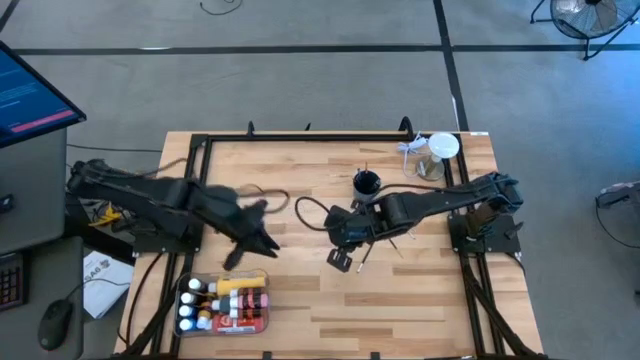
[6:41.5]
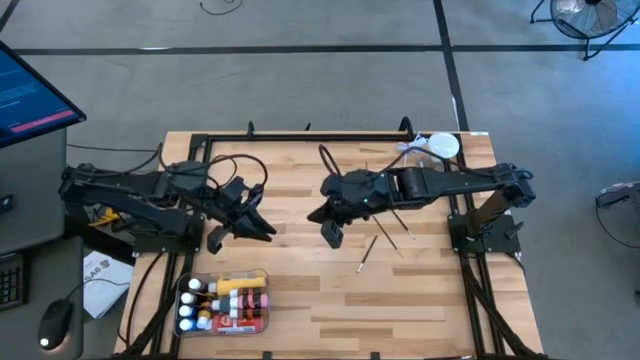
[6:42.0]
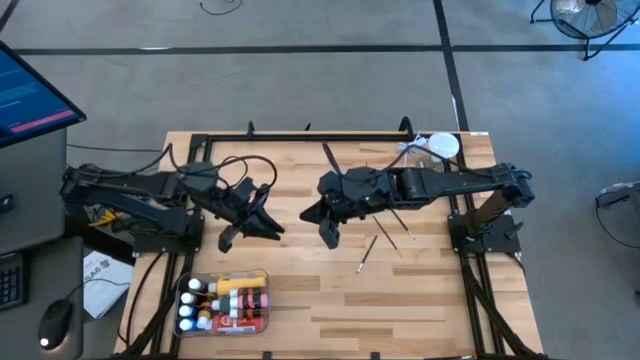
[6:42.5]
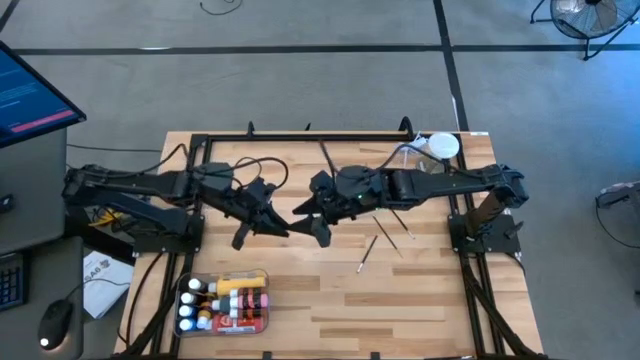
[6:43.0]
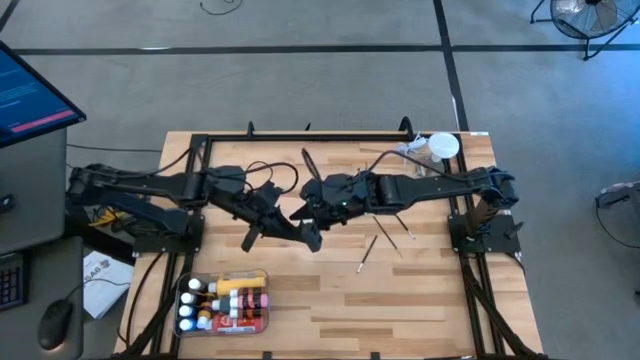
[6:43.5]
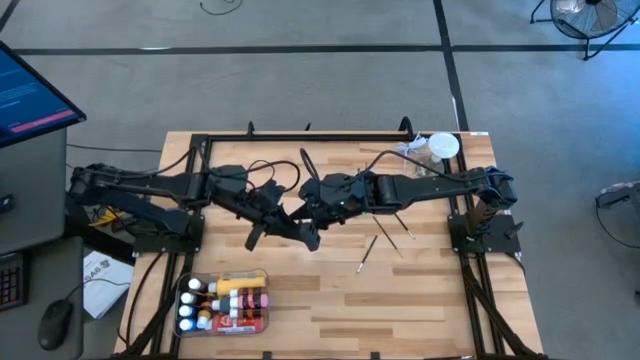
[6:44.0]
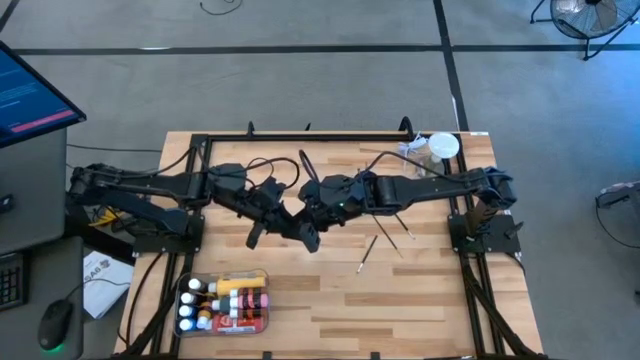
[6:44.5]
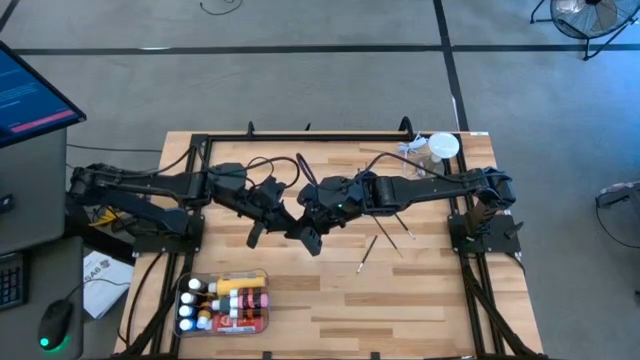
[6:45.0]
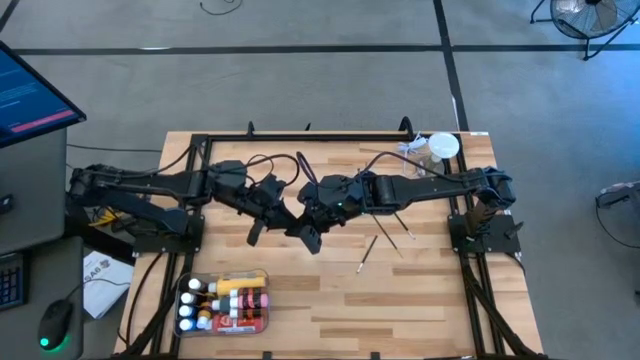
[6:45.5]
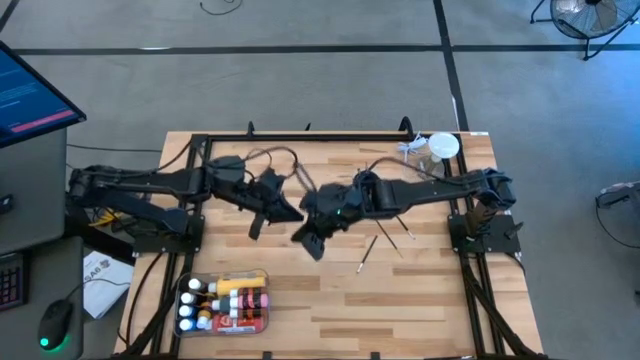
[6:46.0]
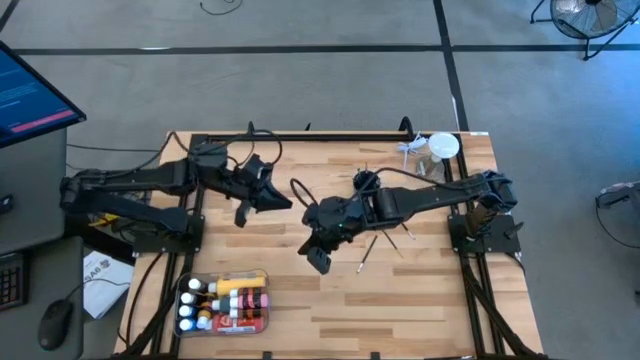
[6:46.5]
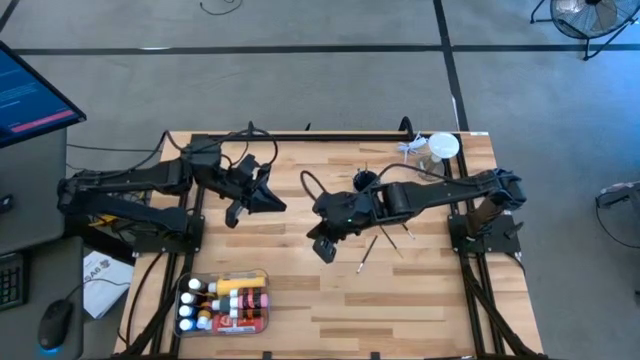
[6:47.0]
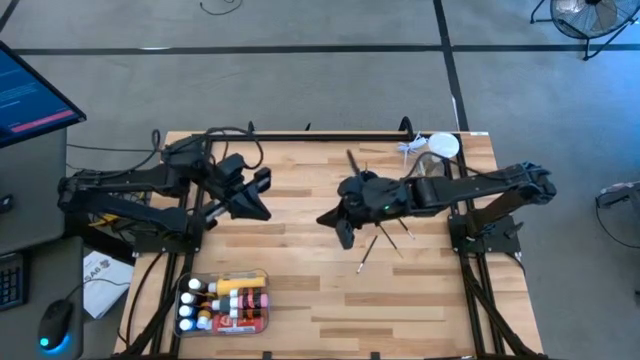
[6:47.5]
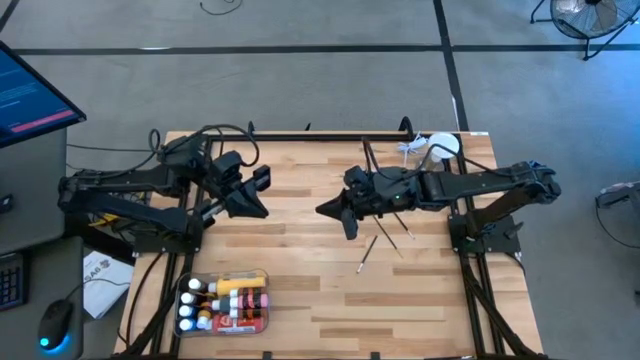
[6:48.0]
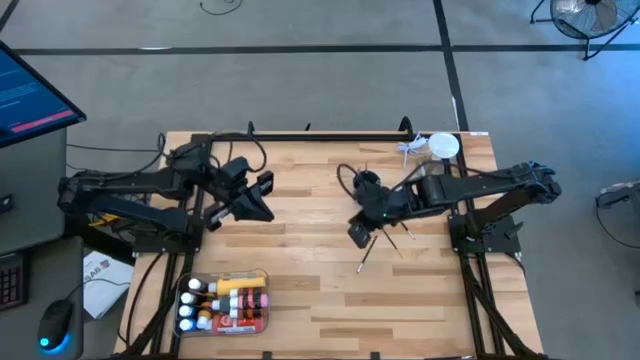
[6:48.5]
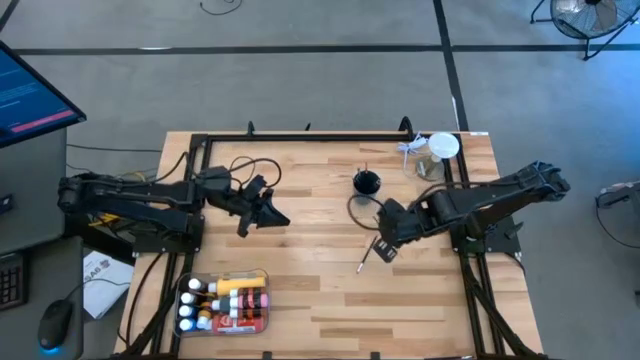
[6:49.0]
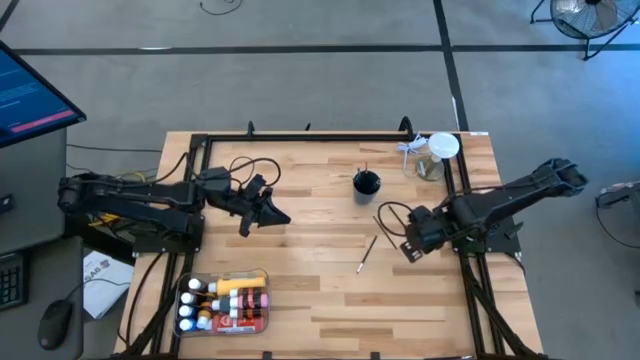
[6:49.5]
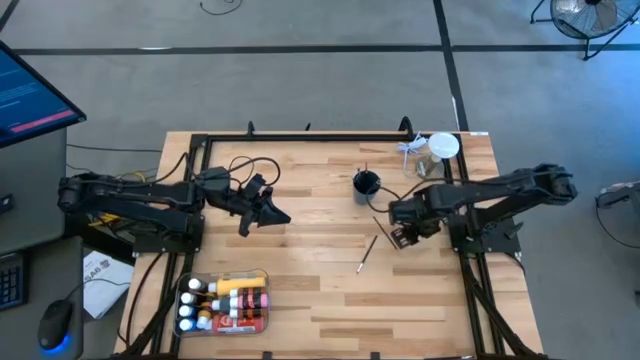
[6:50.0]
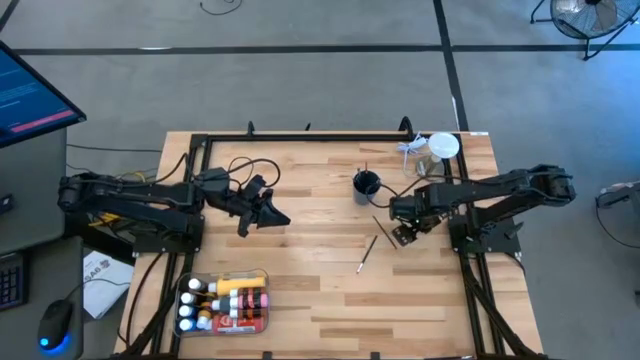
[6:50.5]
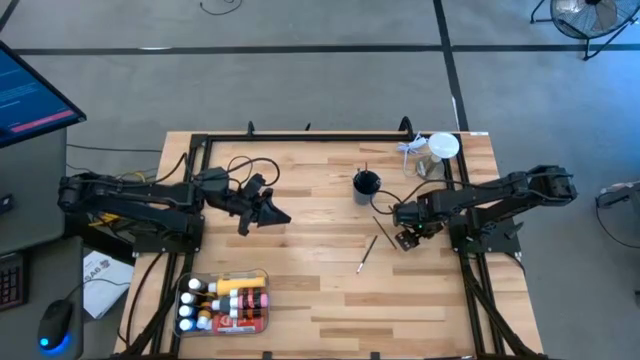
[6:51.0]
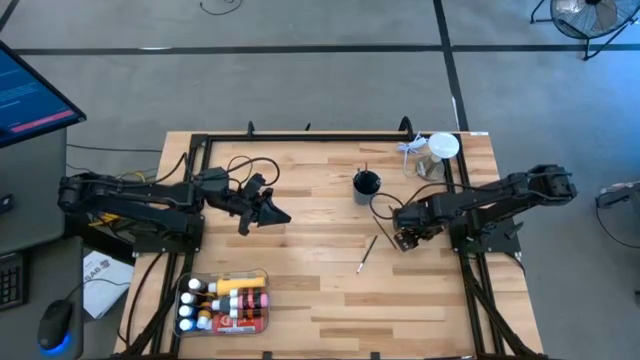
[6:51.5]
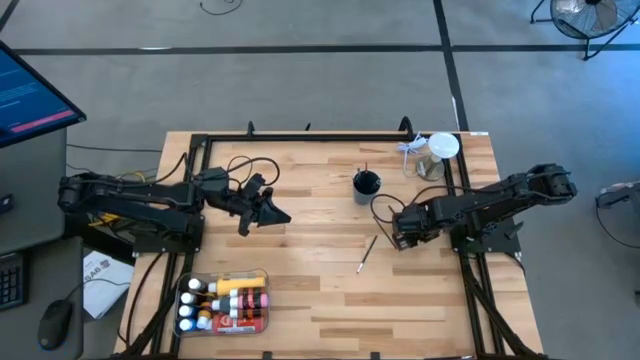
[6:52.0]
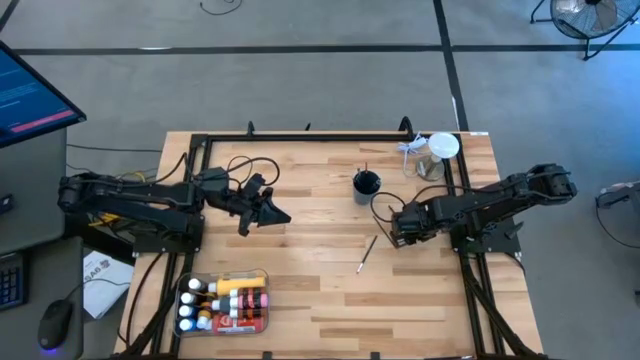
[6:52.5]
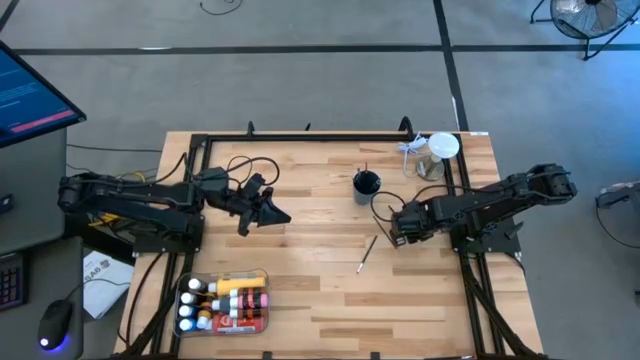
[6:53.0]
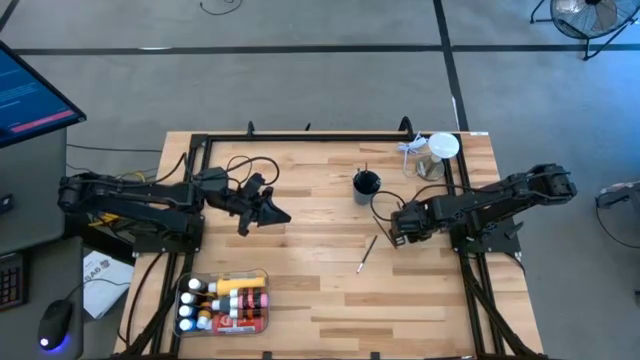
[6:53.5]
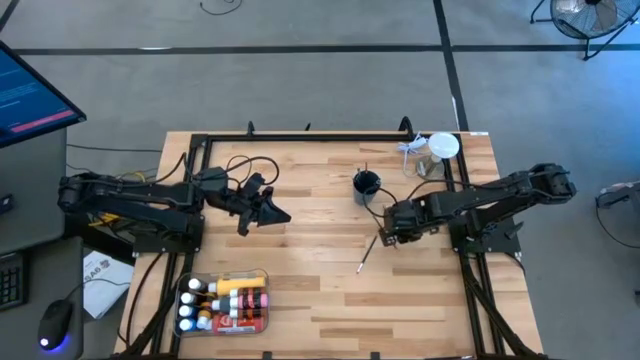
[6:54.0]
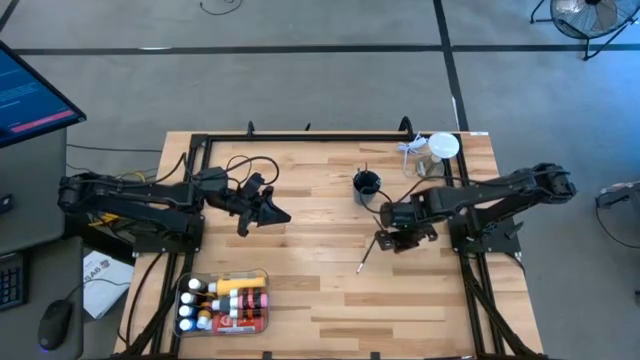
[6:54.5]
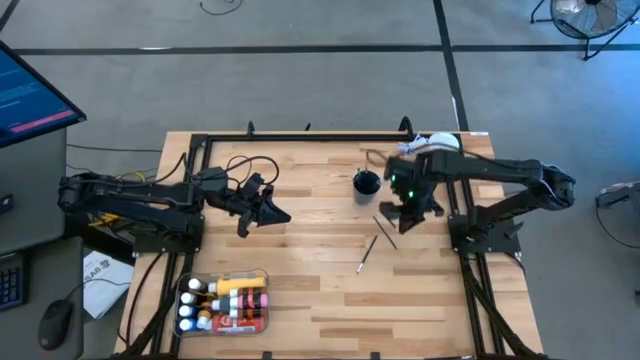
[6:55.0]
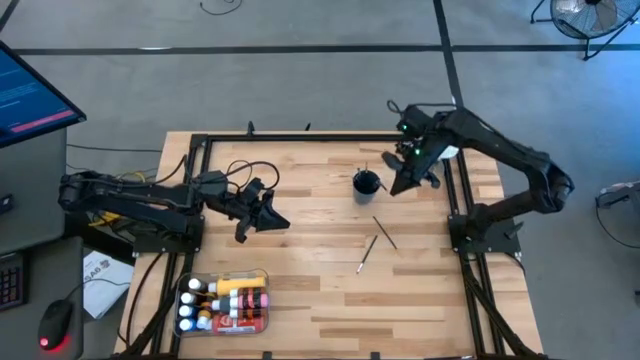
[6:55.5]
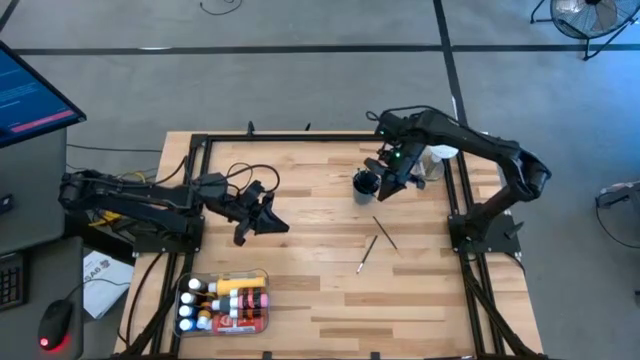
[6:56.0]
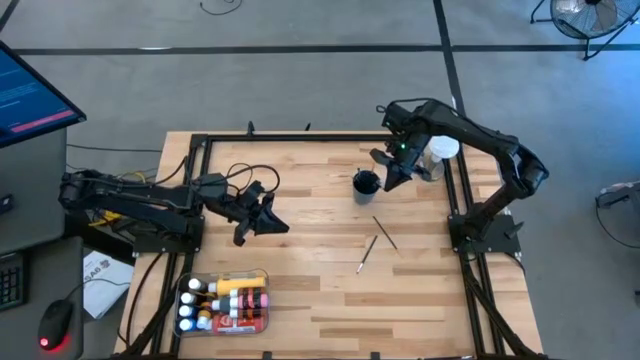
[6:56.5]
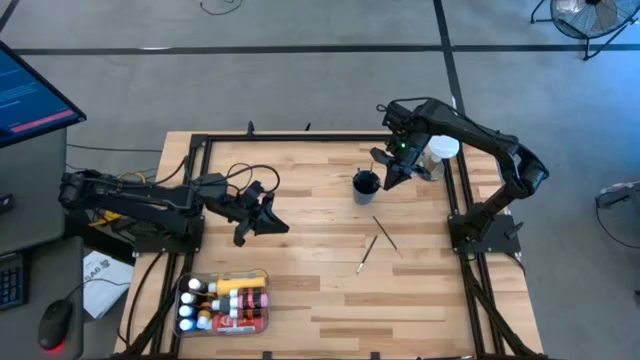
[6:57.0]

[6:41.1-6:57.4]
Task: Pick & Place Paint Supplies
Put the right paint brush into the blue cup

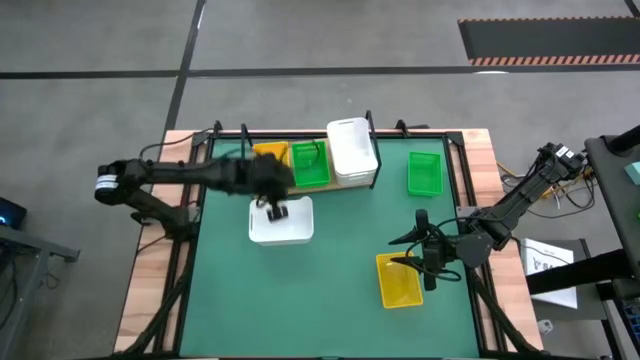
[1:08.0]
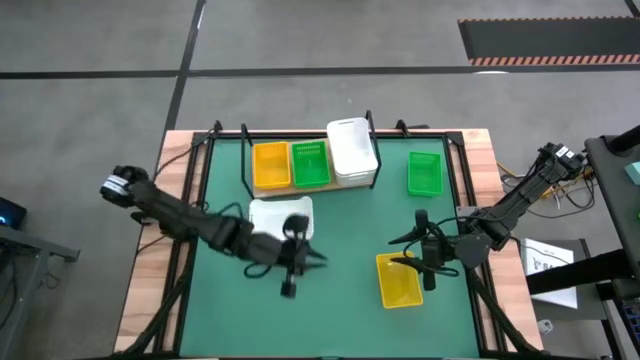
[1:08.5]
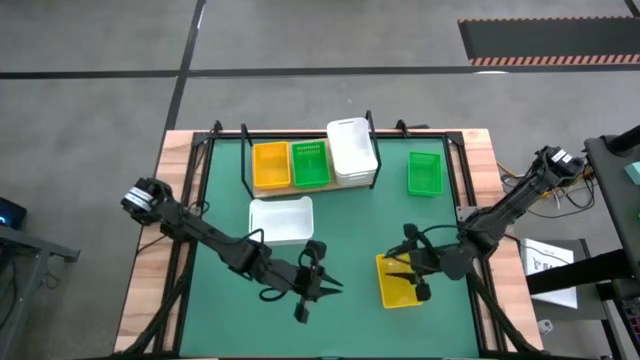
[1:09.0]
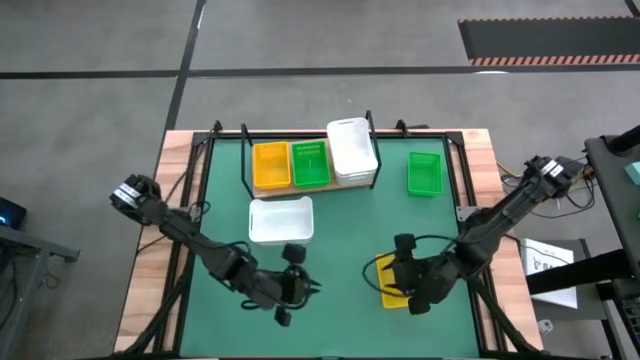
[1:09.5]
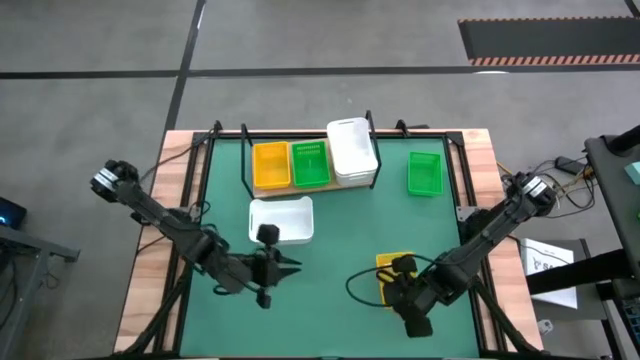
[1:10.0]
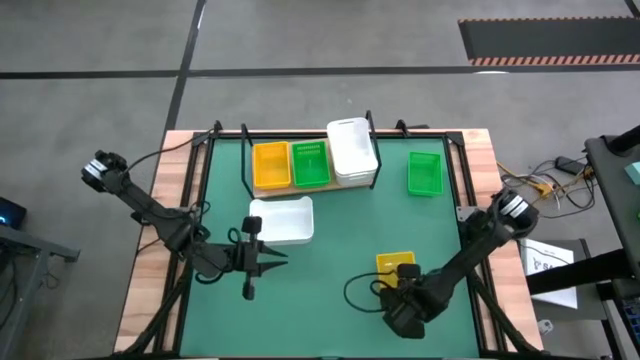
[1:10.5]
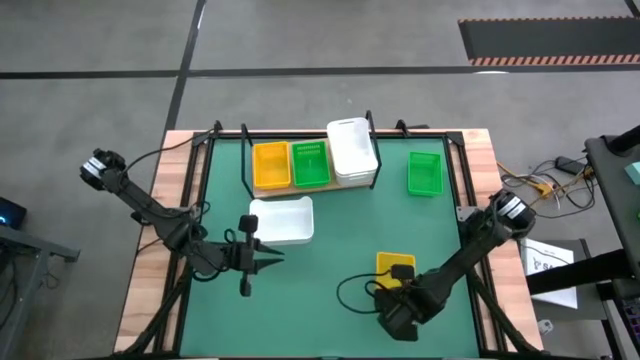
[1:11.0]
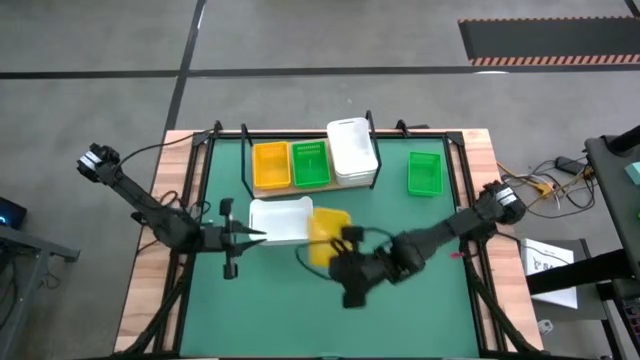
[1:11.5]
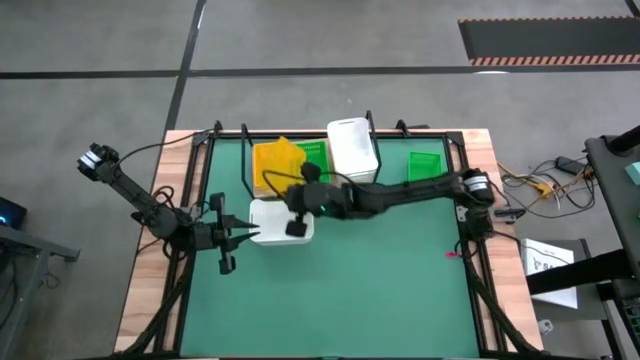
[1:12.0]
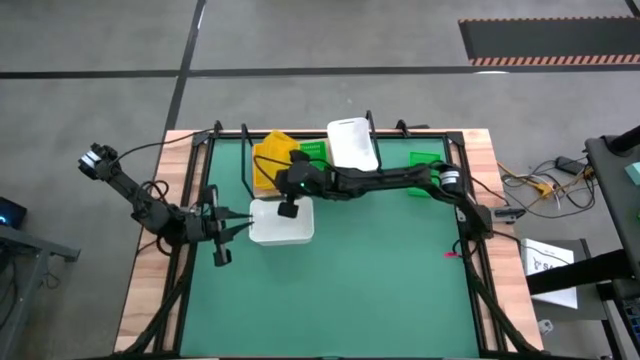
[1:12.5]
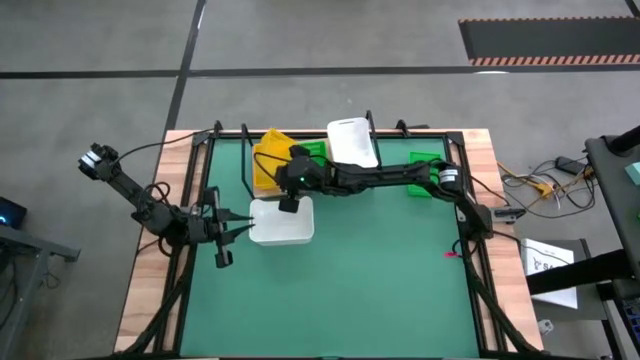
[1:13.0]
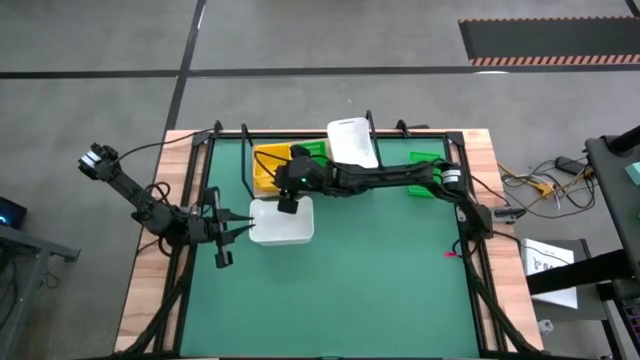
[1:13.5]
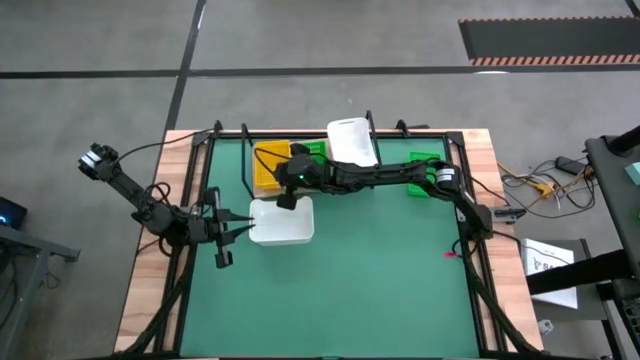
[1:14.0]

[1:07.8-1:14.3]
Task: Stack baskets on shelf by color
Stack the yellow bin on the yellow bin on the shelf
